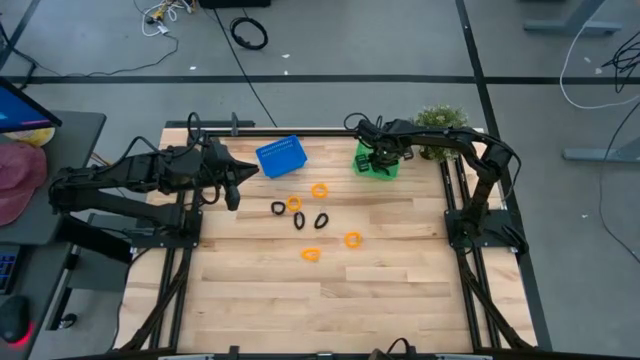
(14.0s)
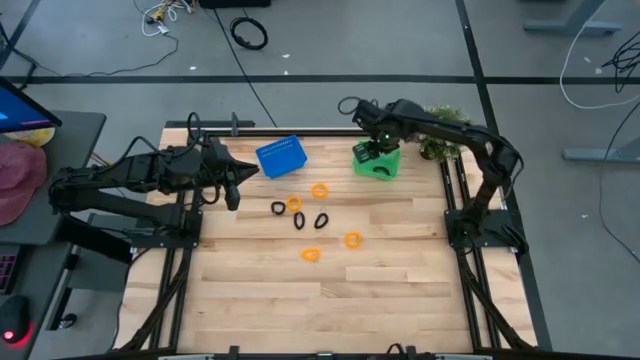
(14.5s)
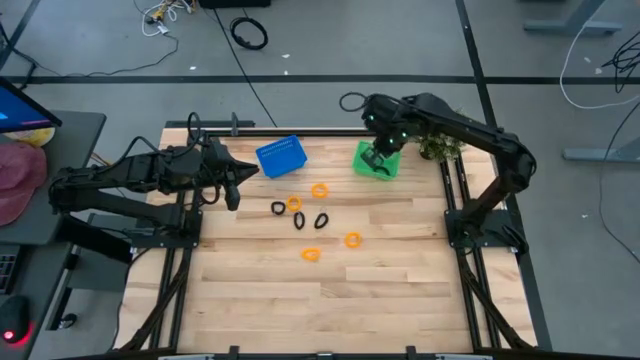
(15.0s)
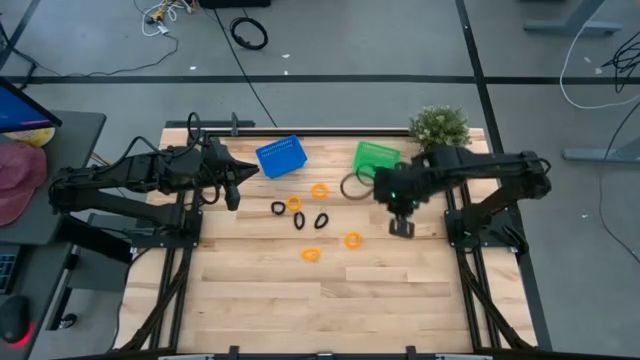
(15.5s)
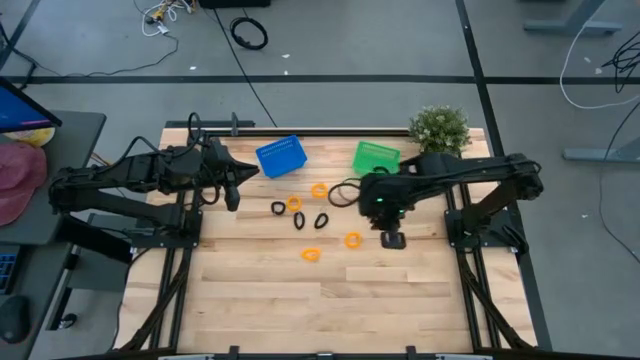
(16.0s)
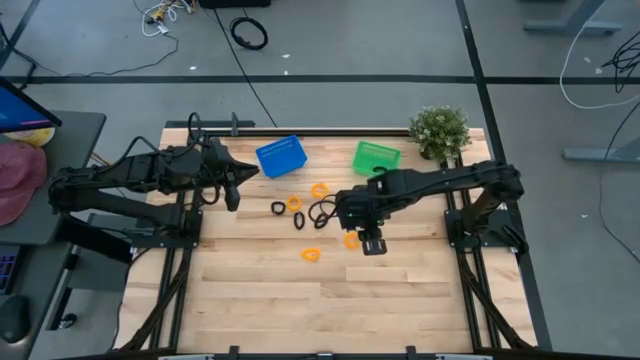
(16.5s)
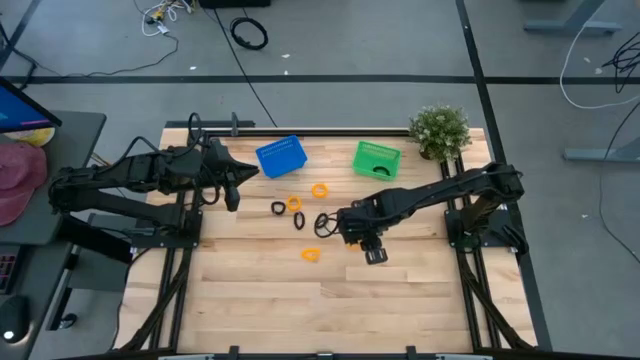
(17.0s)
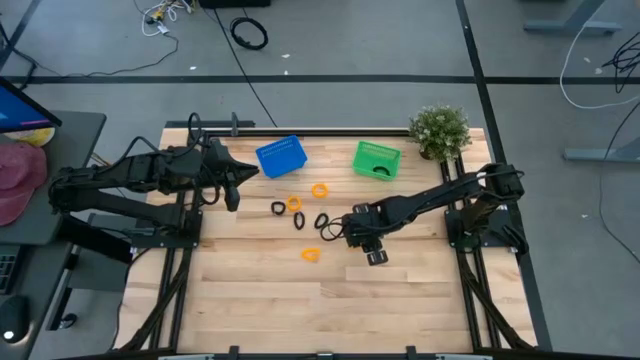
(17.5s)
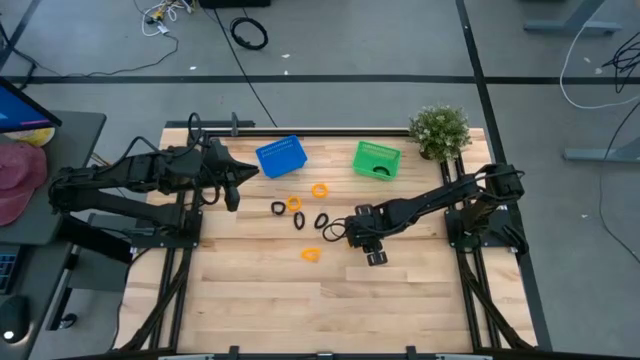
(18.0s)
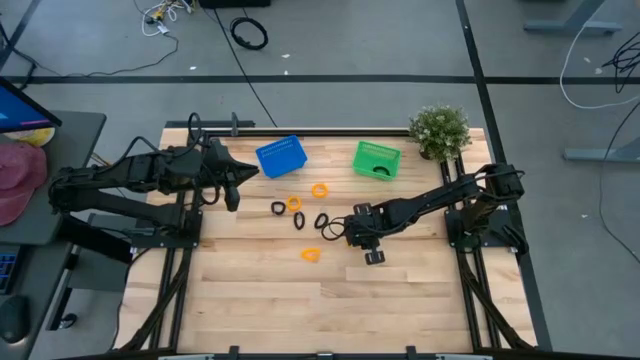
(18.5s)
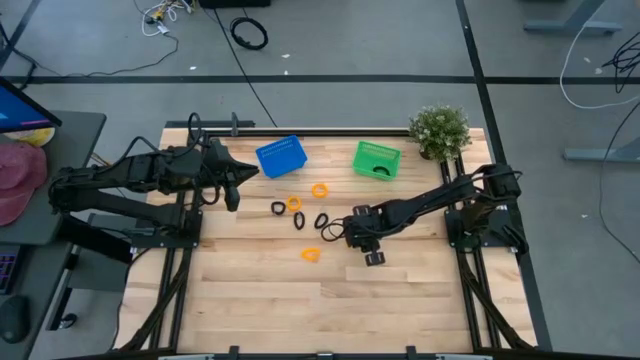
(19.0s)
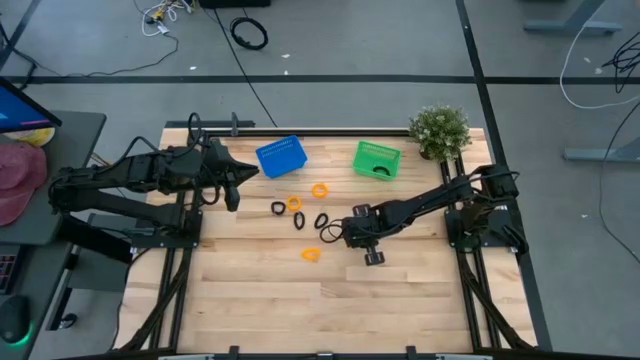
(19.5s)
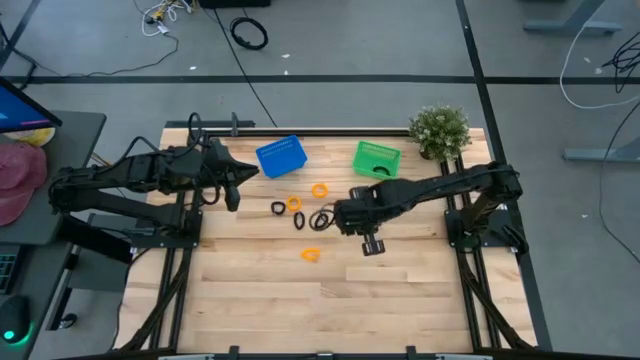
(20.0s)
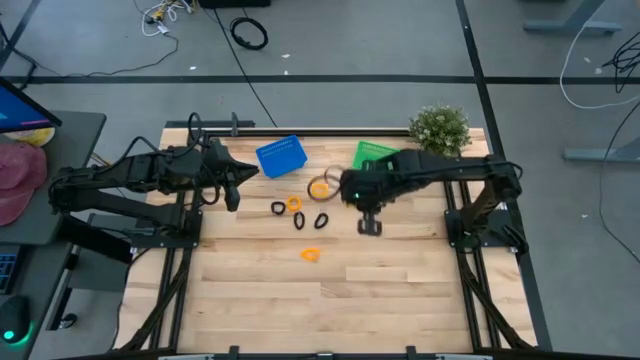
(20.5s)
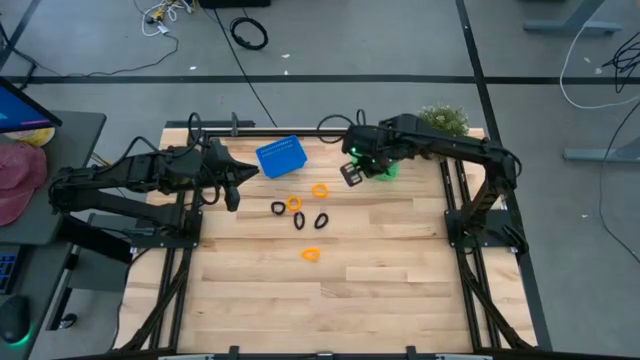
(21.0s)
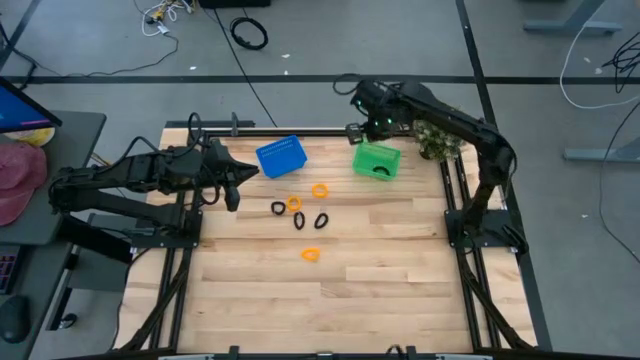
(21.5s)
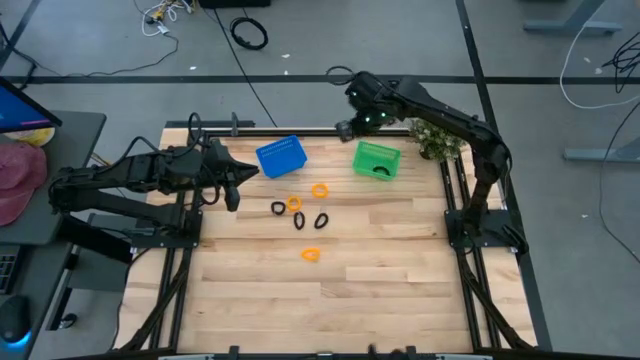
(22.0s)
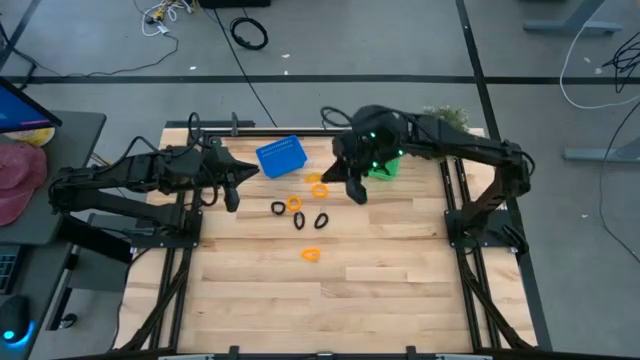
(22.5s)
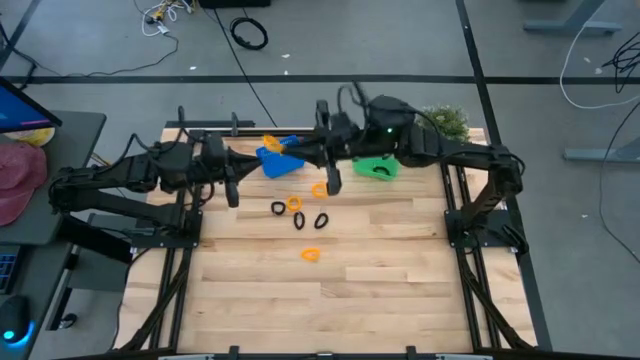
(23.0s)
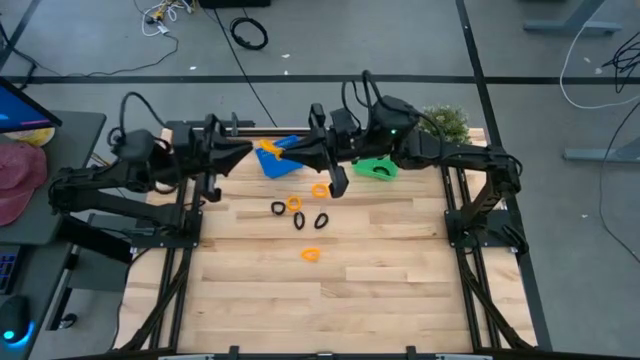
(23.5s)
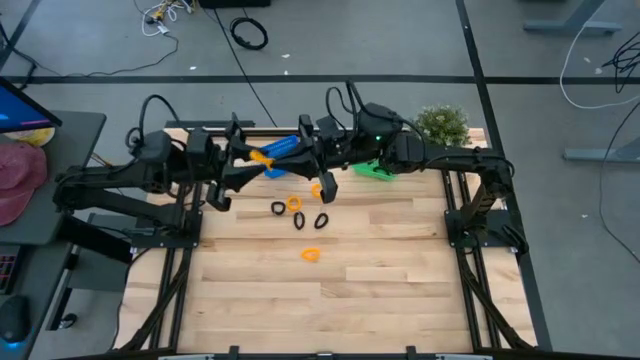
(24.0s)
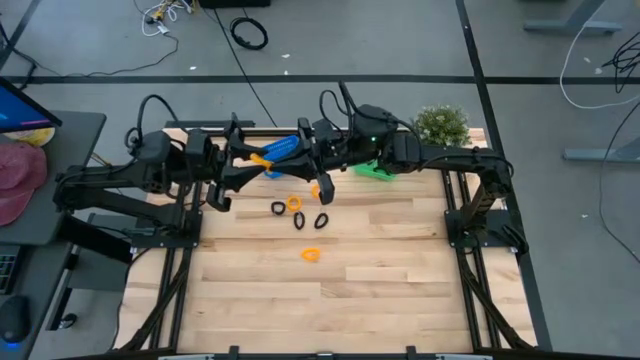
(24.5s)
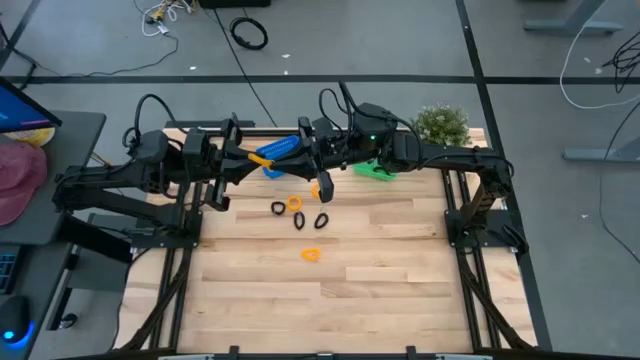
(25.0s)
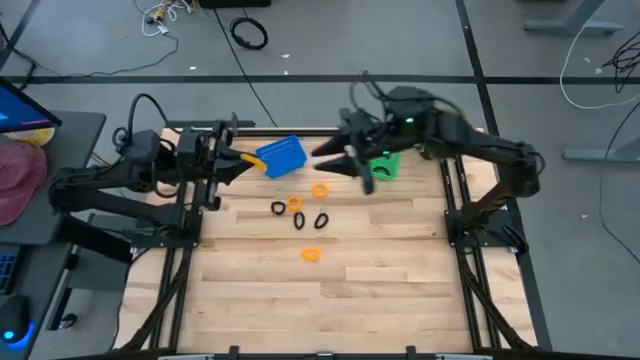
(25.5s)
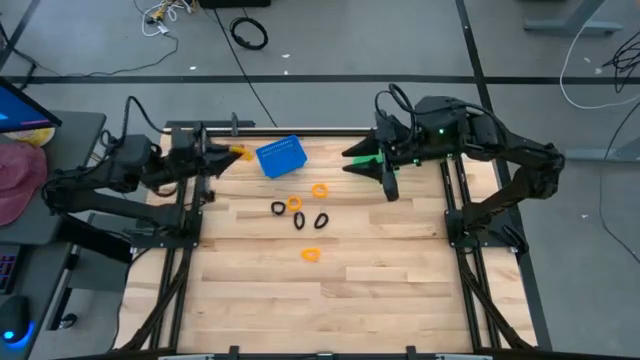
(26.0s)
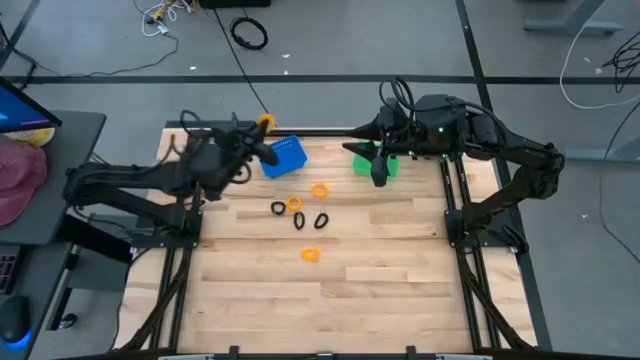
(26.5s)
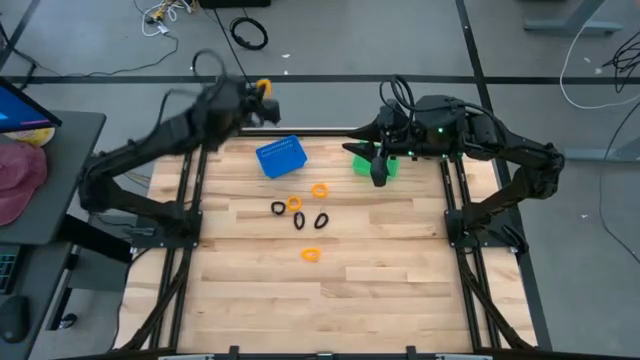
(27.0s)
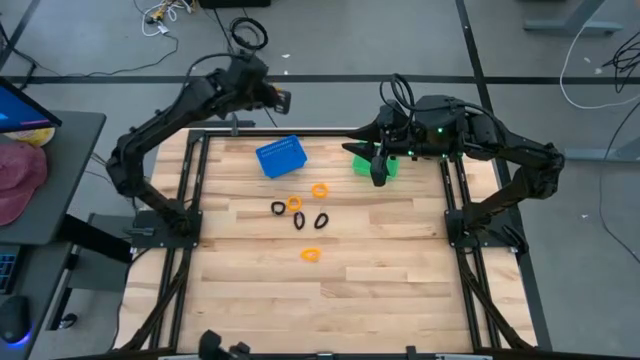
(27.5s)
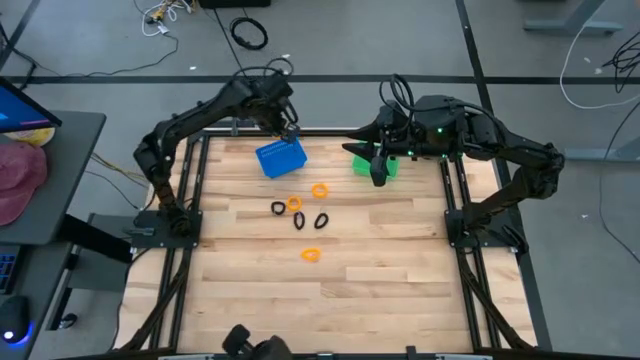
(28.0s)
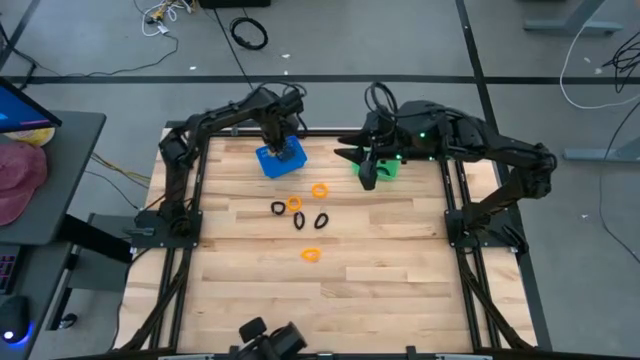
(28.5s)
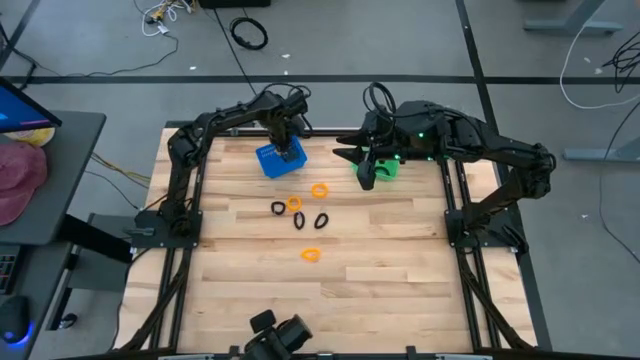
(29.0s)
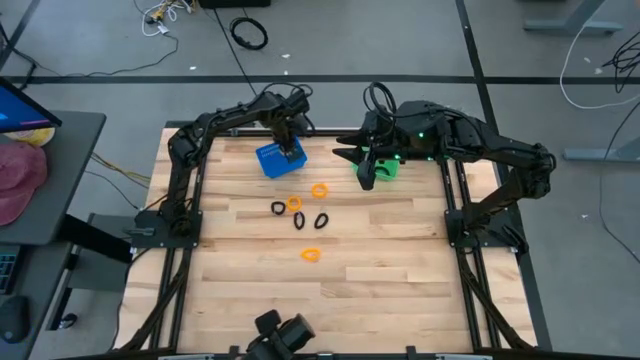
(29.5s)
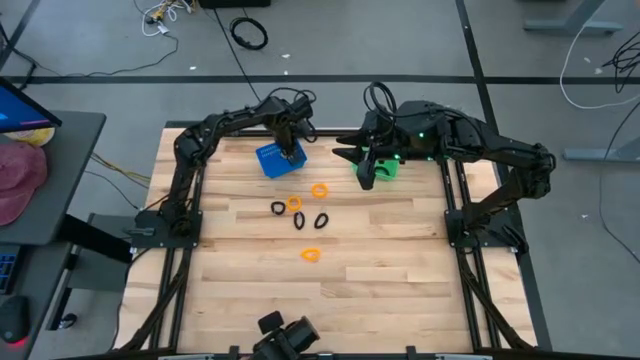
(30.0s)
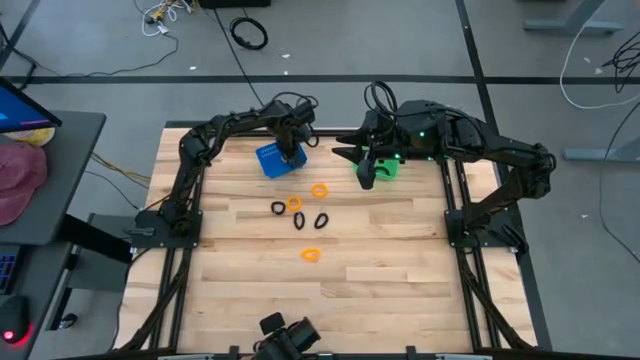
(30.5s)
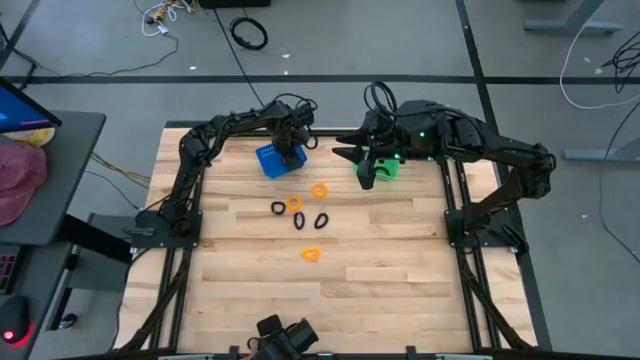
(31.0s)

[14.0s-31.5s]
Task: Sort spring keychains
Put the yellow spring keychain into the blue bin
